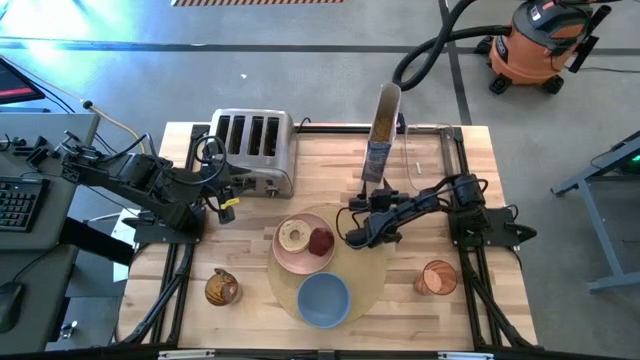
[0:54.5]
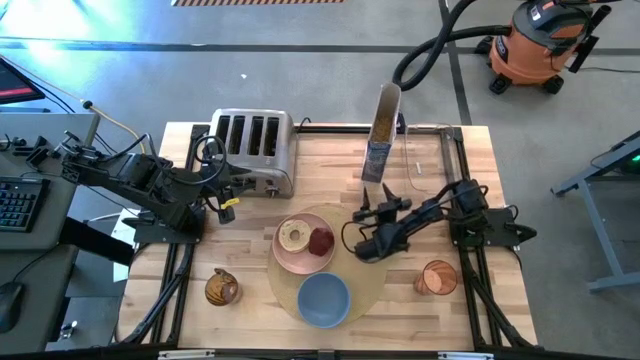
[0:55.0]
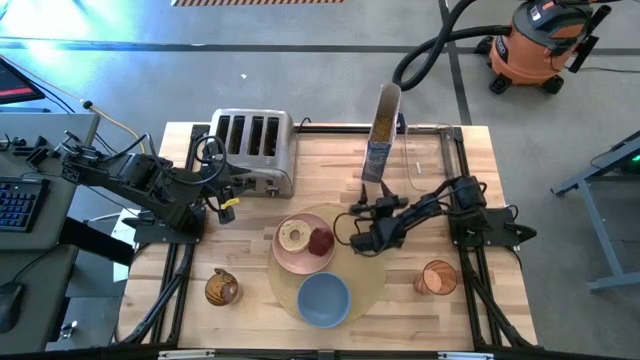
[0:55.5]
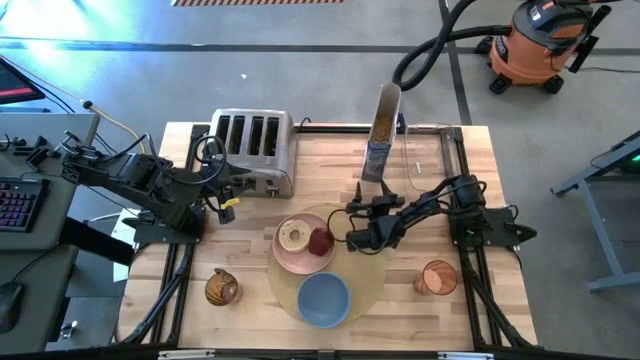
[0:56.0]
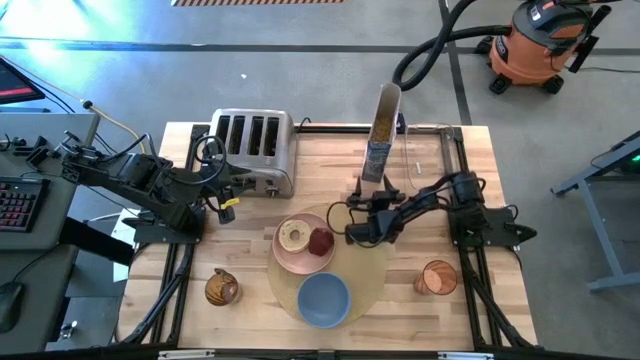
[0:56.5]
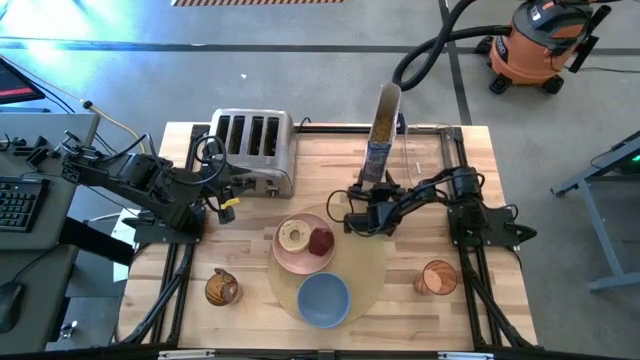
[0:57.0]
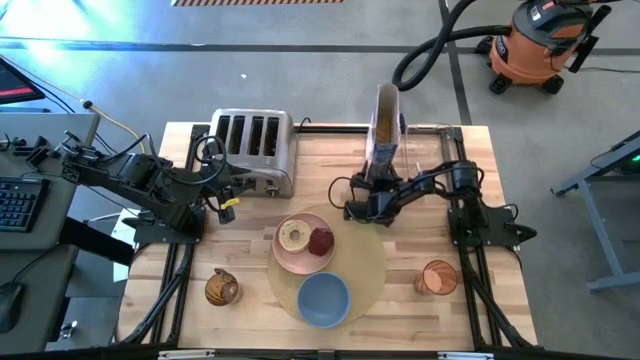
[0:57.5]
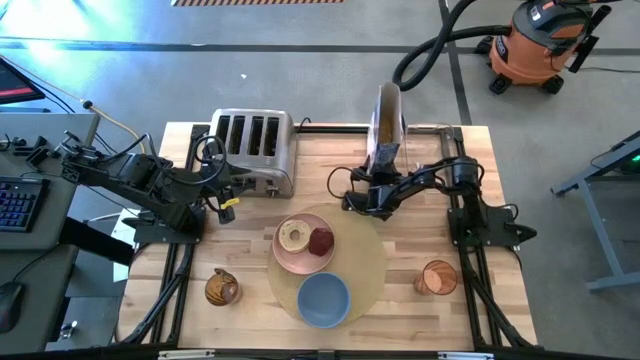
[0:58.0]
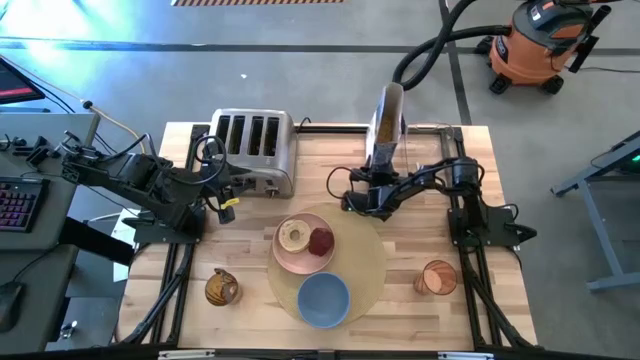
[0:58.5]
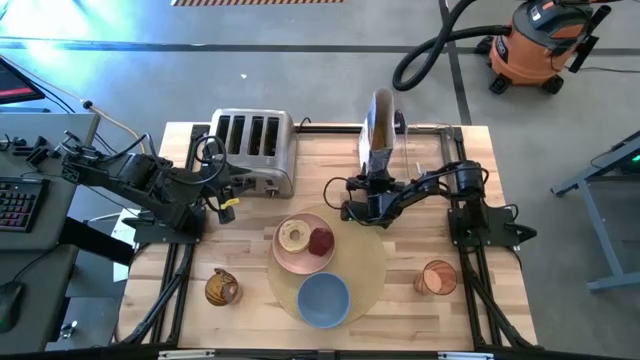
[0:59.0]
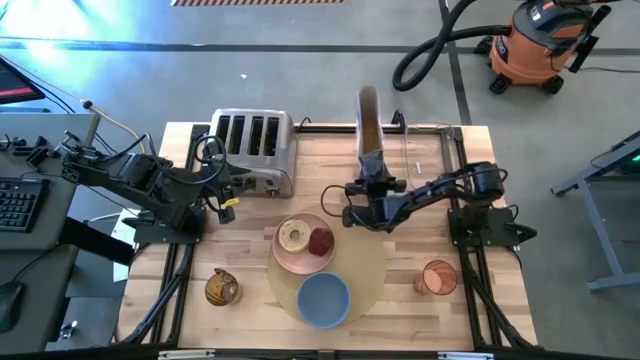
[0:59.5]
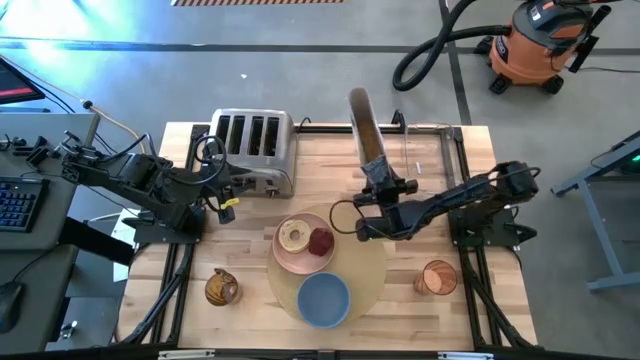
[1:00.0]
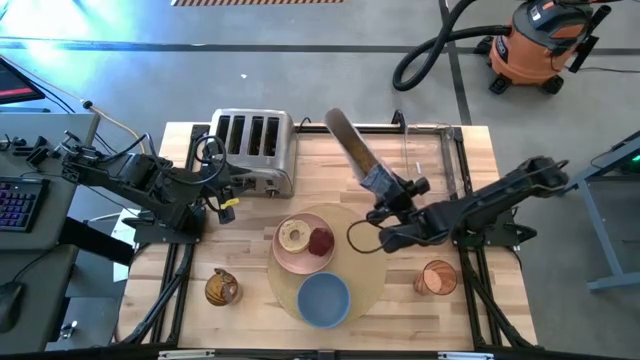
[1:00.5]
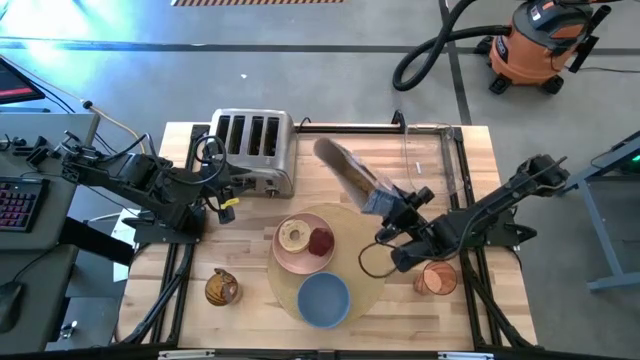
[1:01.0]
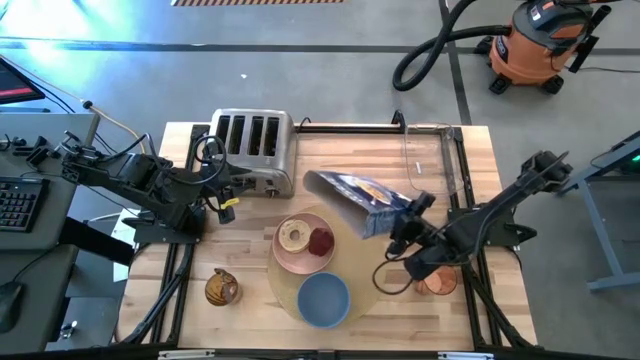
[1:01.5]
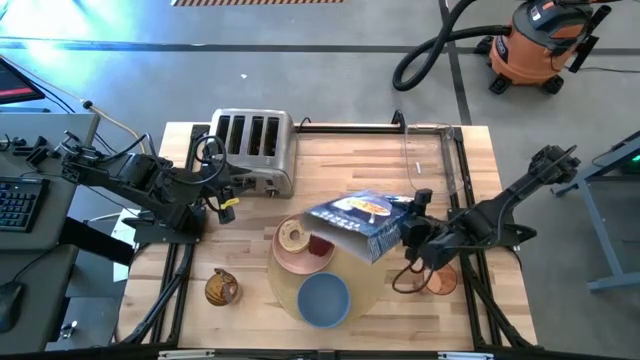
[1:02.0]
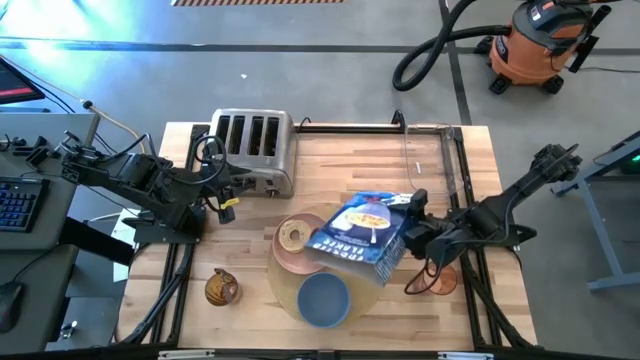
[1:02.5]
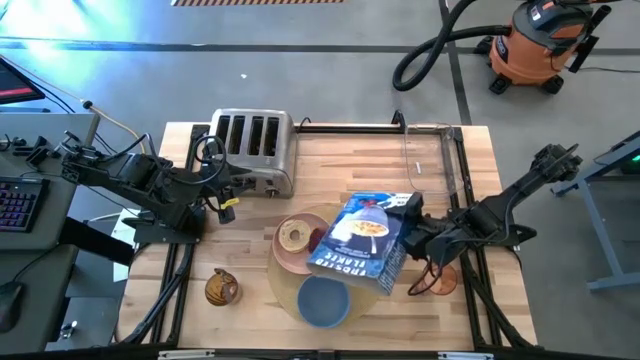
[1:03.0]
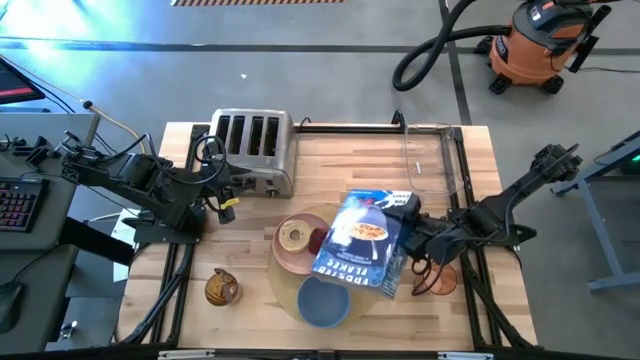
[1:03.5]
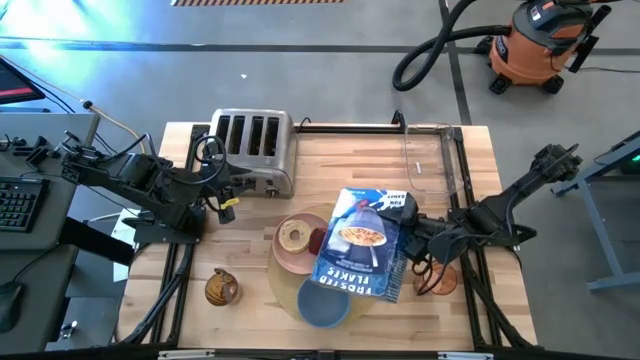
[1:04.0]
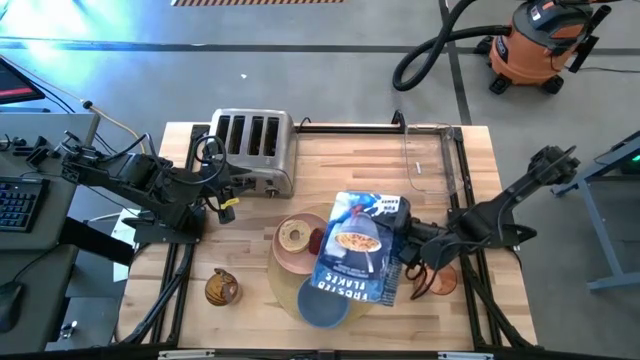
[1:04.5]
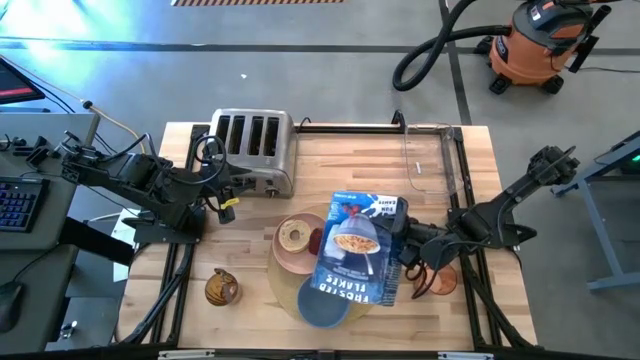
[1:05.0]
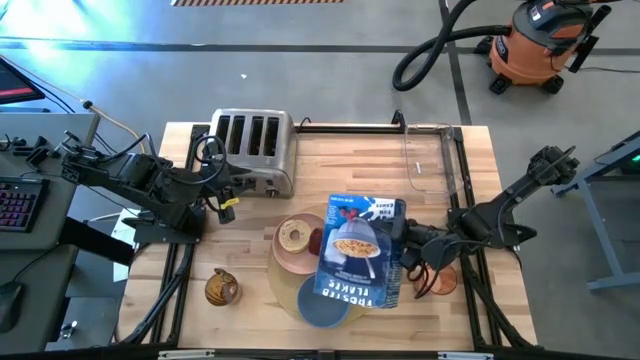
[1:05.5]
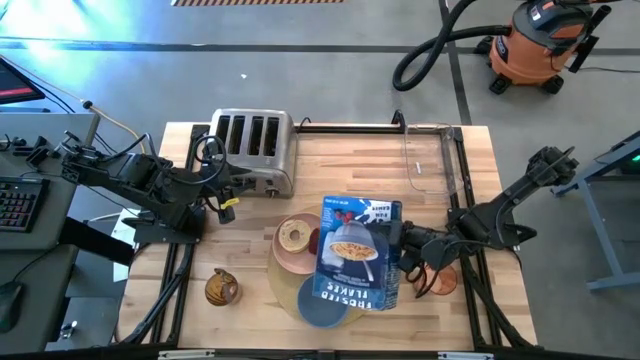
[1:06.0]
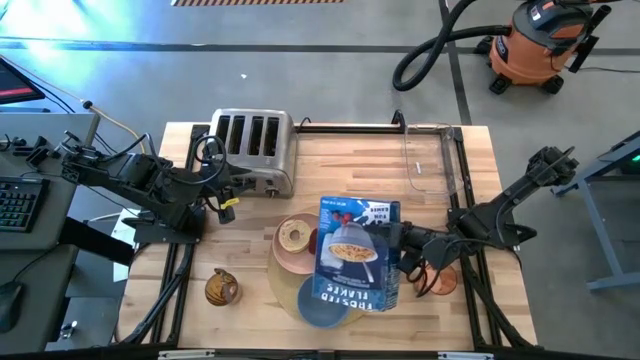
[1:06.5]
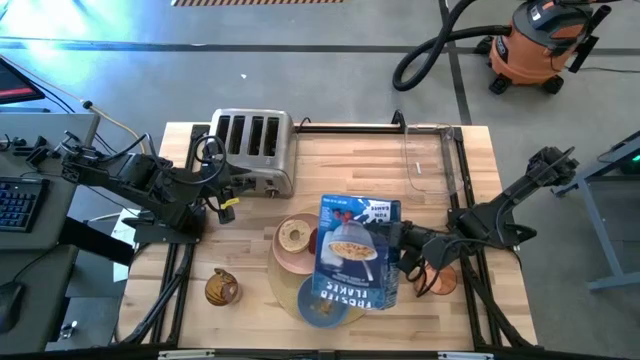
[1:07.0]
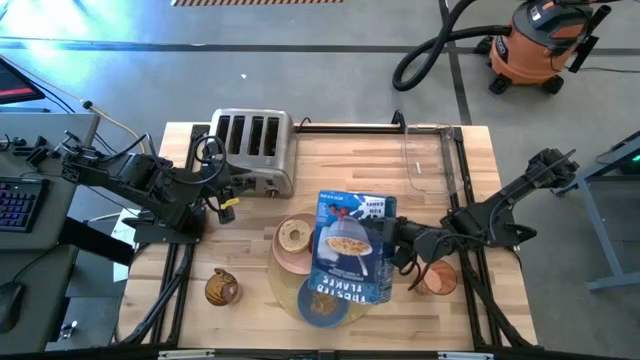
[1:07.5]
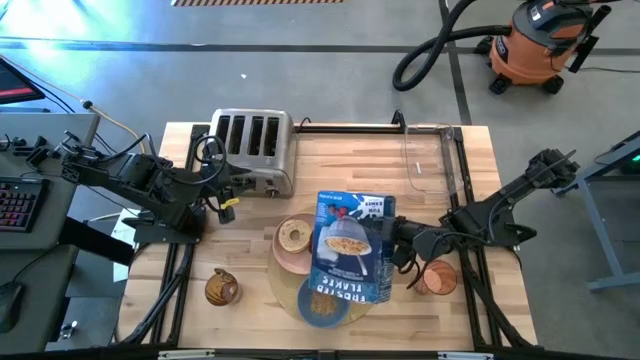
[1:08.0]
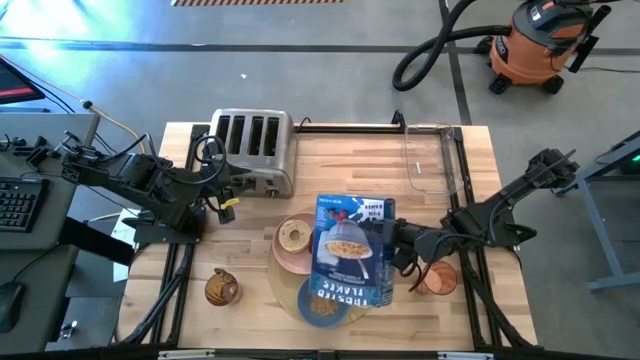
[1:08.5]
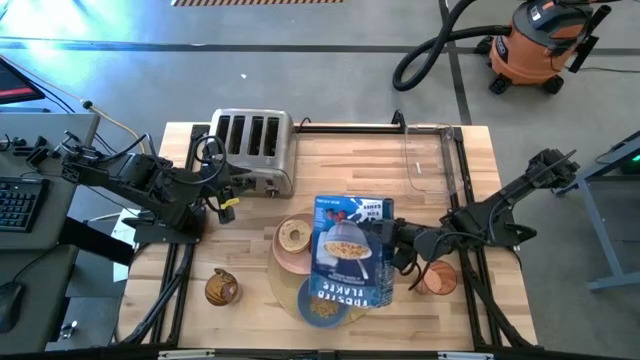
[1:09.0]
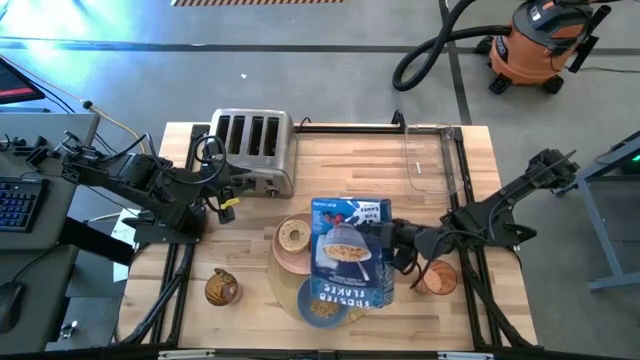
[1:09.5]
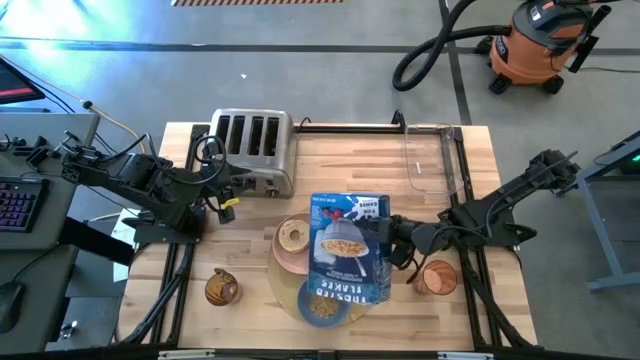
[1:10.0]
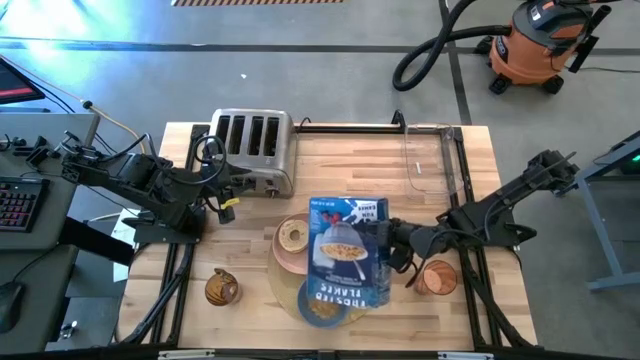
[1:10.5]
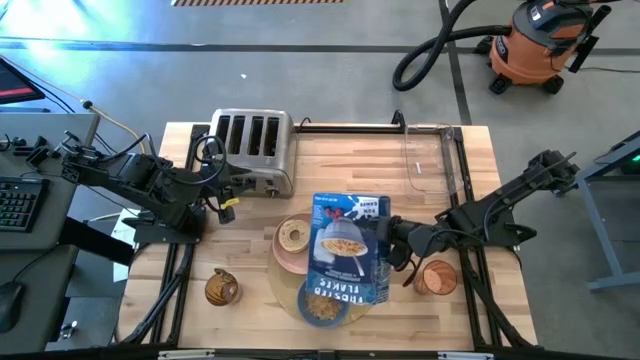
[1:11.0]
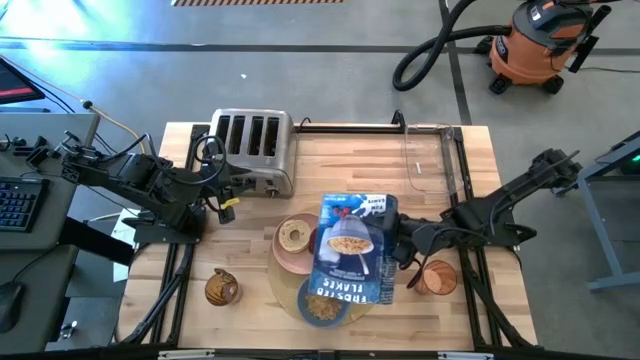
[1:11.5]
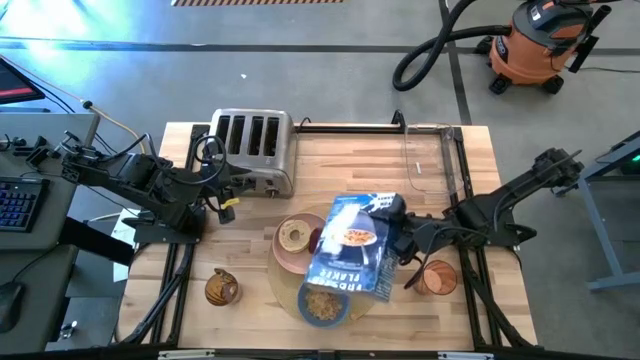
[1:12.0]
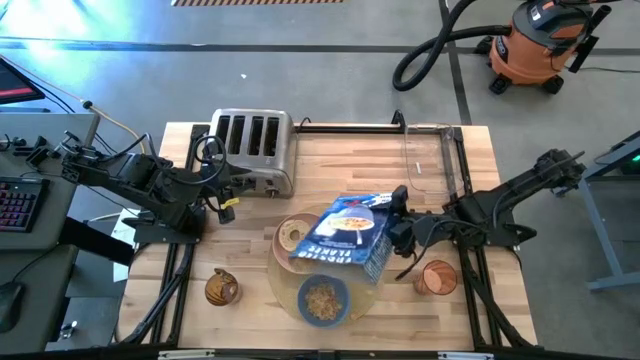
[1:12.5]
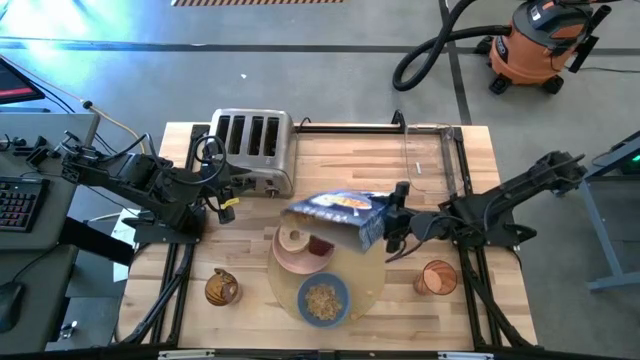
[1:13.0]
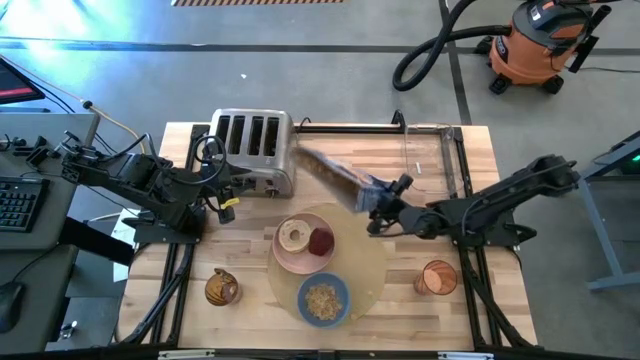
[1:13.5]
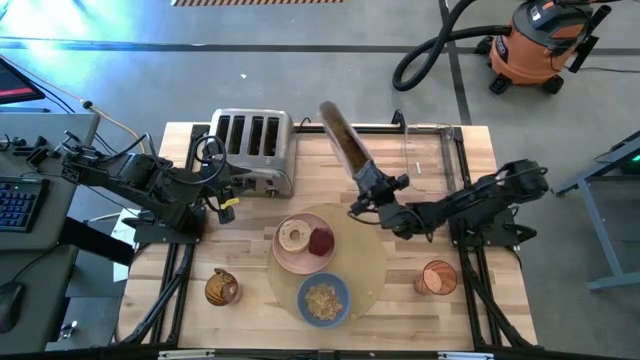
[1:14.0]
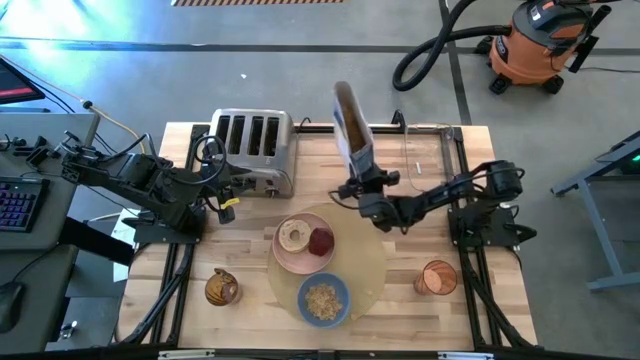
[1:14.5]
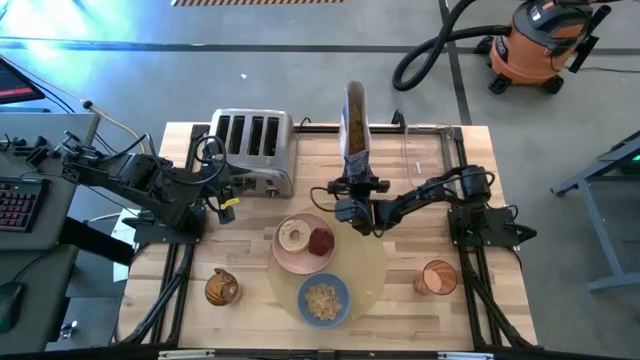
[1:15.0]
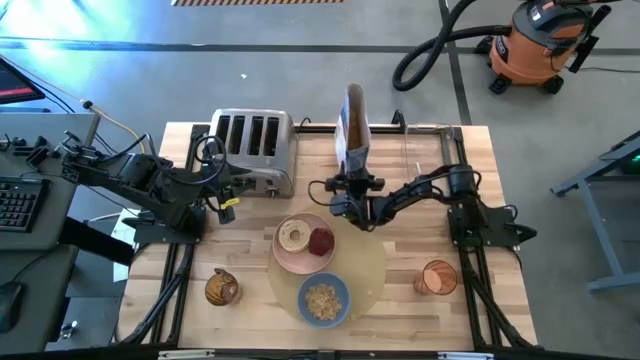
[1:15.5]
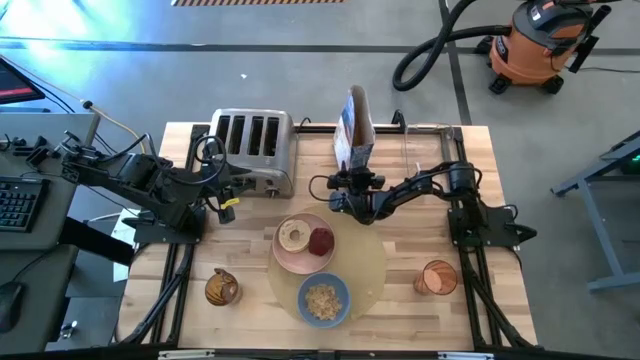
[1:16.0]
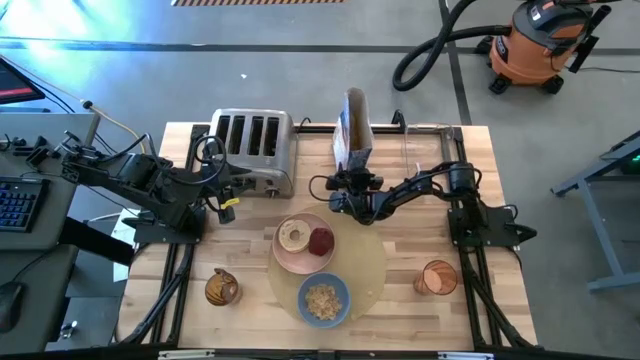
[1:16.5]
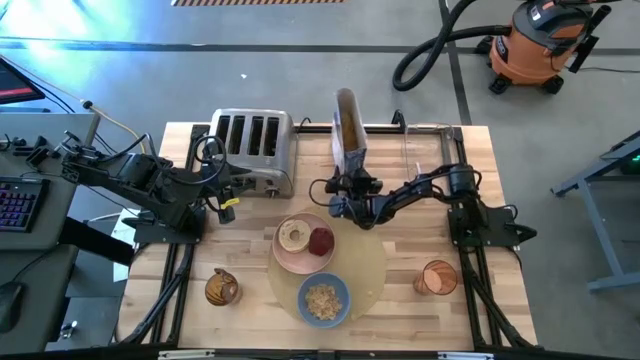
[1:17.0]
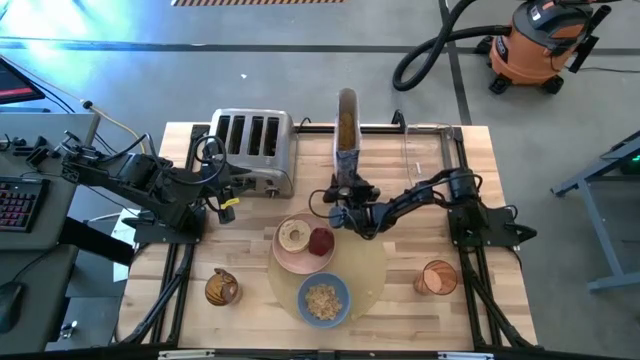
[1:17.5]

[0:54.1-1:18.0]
Task: Arrange a breakfast setting
Pour the cereal into the blue bowl
